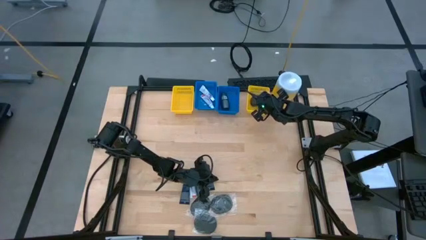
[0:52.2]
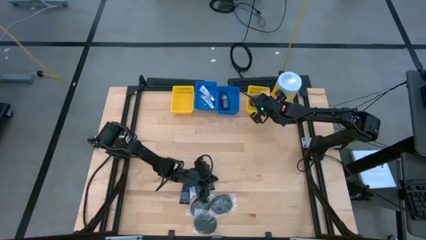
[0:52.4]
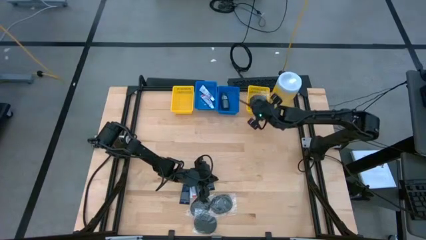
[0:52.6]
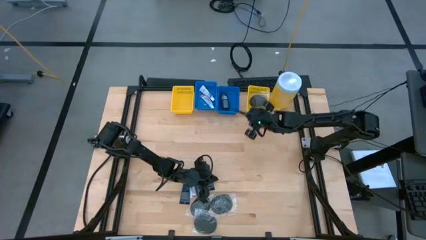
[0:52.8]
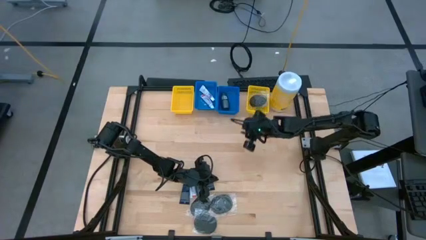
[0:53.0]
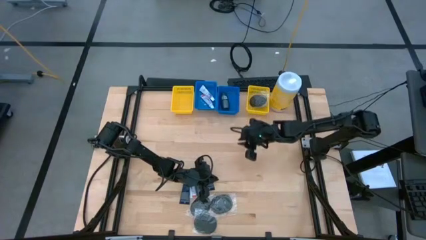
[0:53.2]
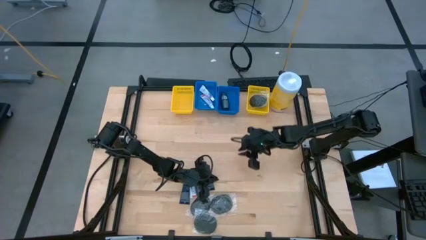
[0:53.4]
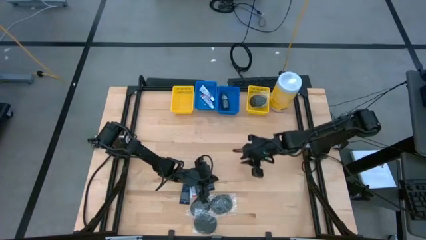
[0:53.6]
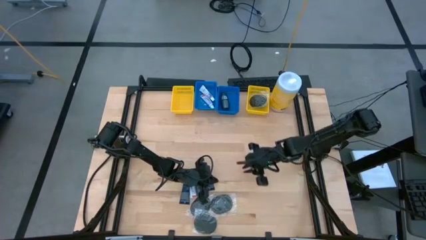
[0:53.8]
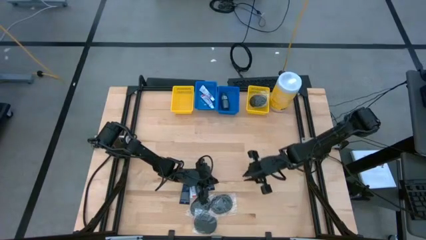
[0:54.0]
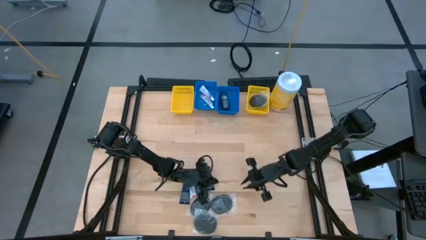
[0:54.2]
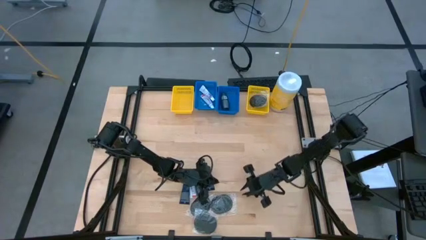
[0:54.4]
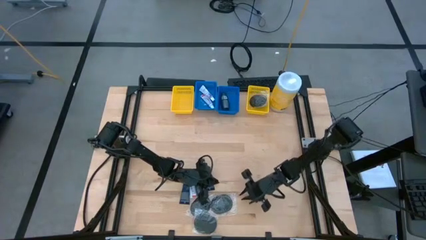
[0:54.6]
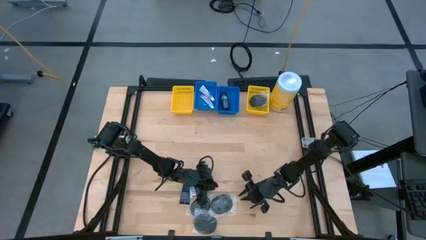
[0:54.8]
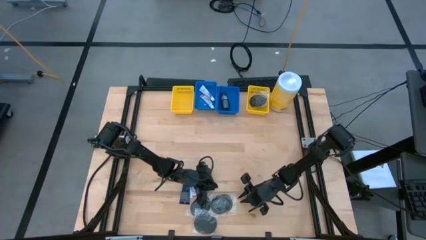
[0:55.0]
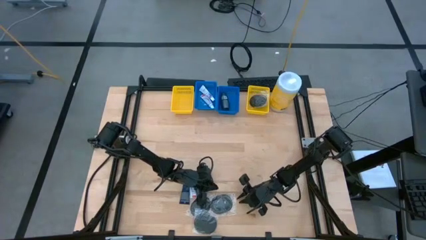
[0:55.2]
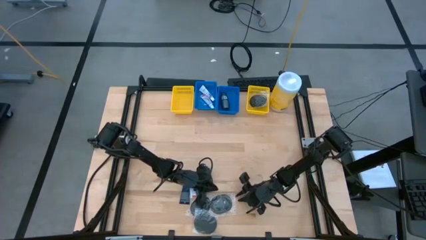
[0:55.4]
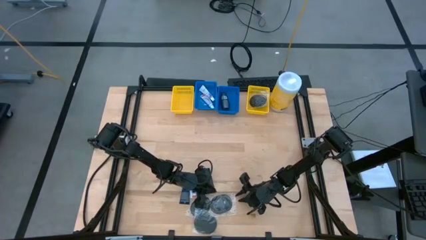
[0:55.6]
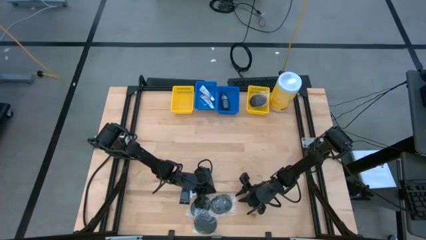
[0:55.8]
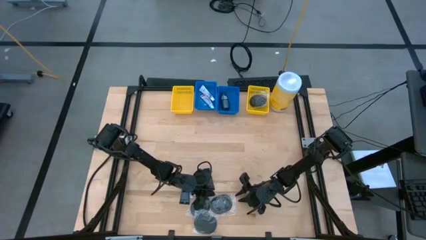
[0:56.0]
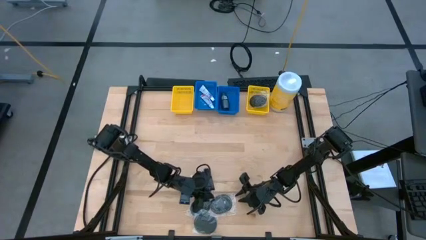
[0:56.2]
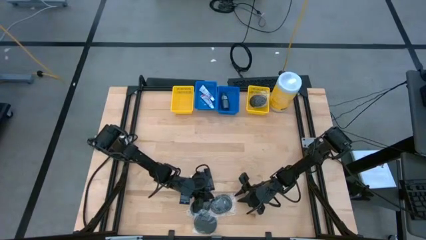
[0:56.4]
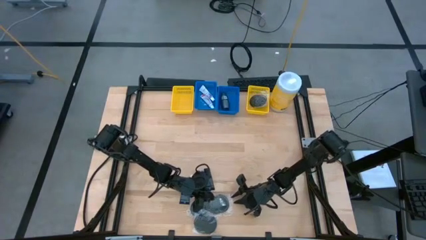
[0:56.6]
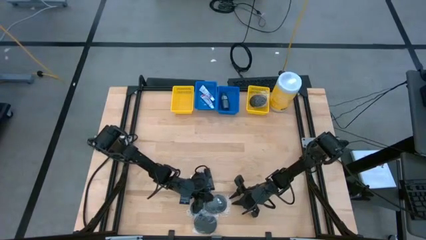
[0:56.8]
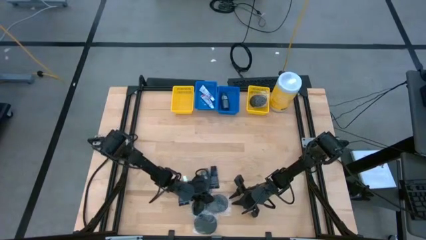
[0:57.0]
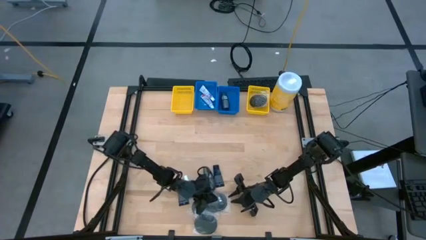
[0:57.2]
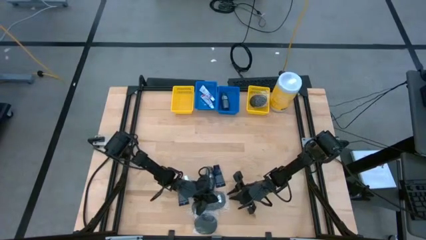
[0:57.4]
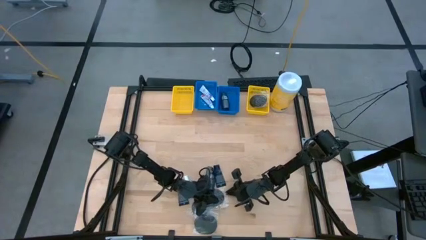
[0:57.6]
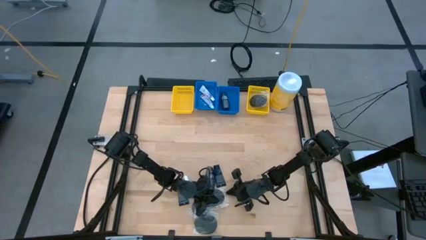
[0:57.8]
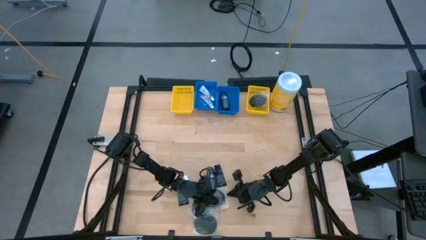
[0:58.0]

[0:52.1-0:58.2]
Task: Pick & Place Travel size toiletries
Put the black hairbrush into the right yellow bin

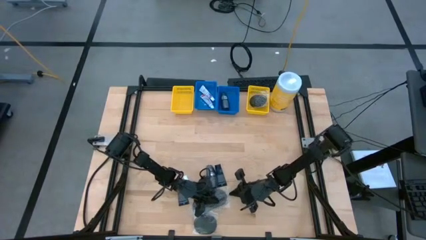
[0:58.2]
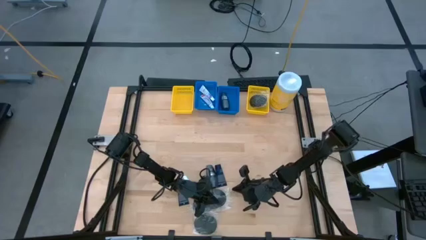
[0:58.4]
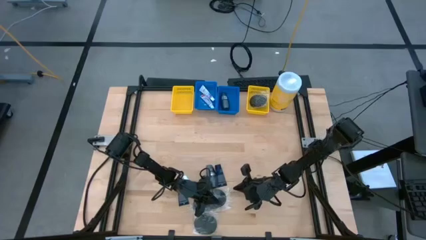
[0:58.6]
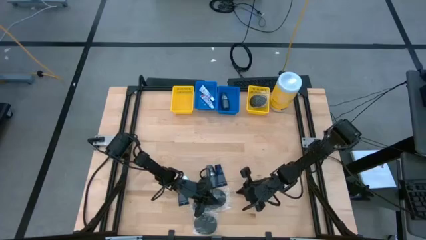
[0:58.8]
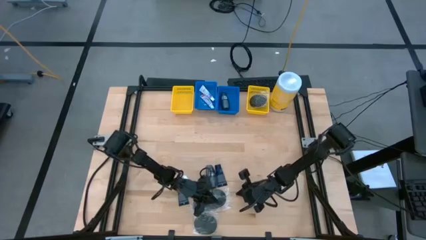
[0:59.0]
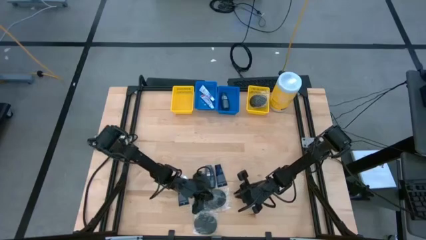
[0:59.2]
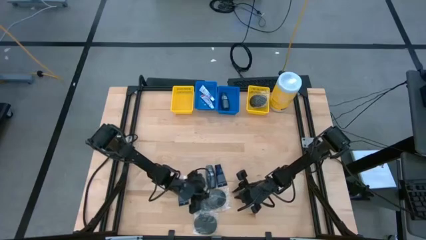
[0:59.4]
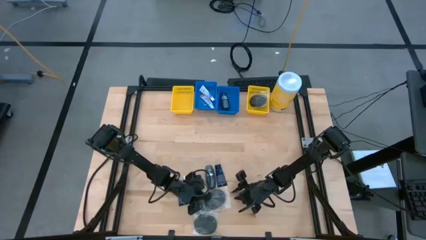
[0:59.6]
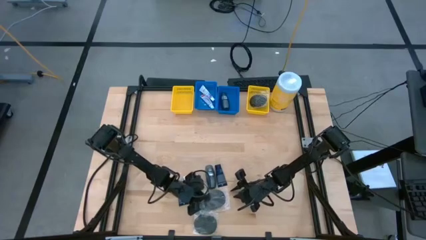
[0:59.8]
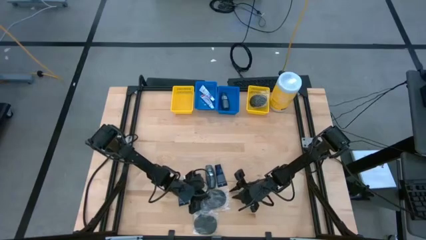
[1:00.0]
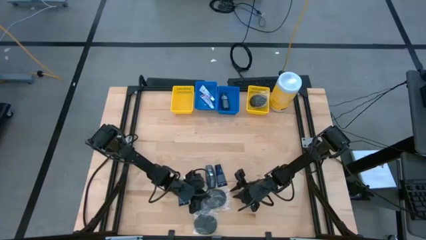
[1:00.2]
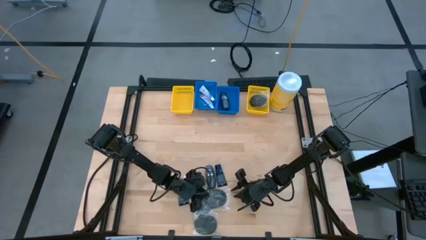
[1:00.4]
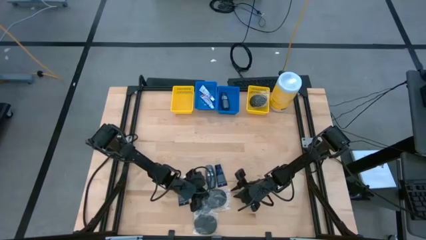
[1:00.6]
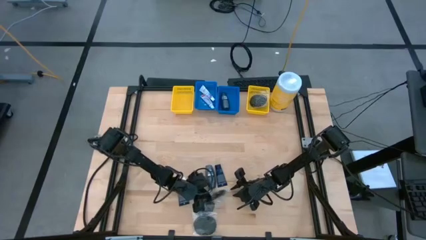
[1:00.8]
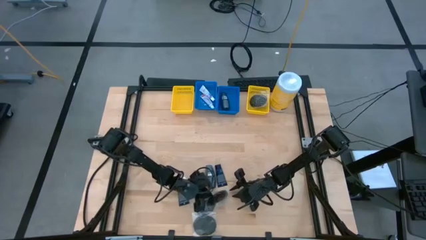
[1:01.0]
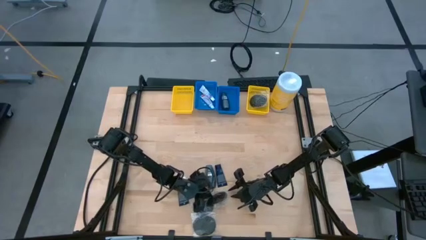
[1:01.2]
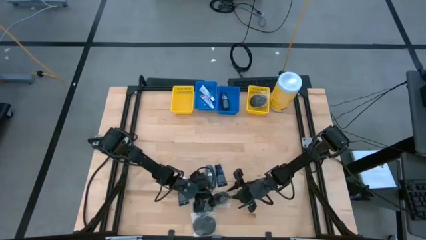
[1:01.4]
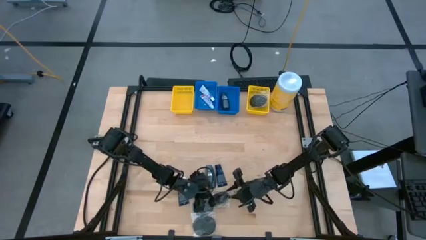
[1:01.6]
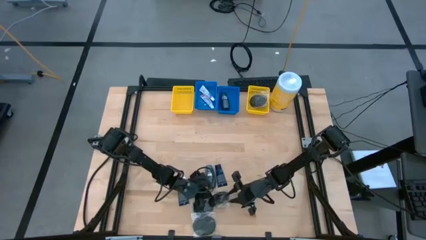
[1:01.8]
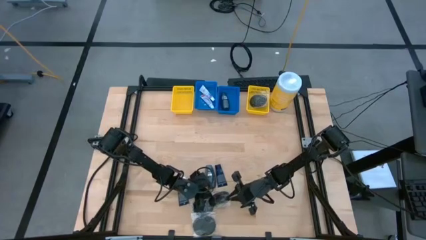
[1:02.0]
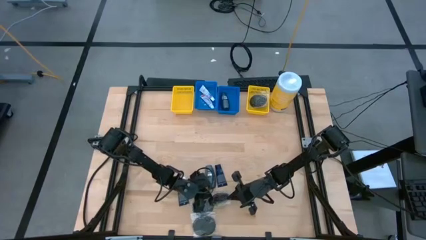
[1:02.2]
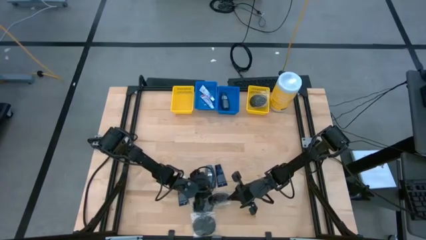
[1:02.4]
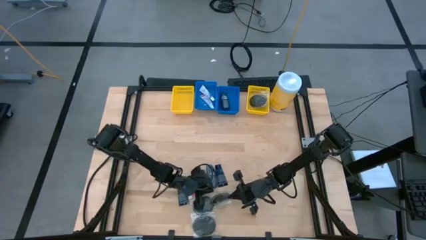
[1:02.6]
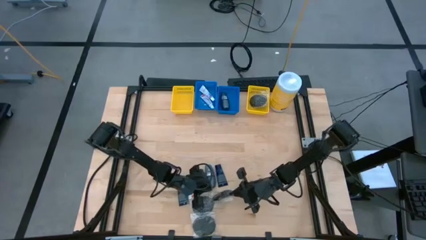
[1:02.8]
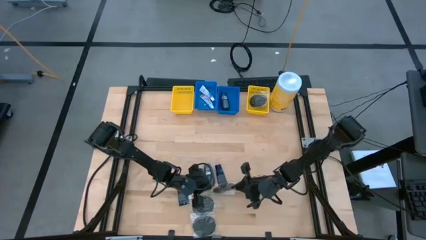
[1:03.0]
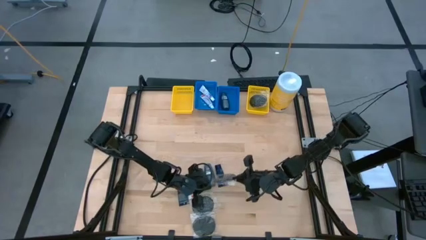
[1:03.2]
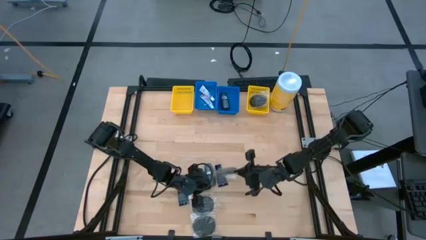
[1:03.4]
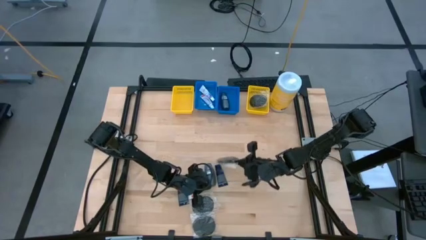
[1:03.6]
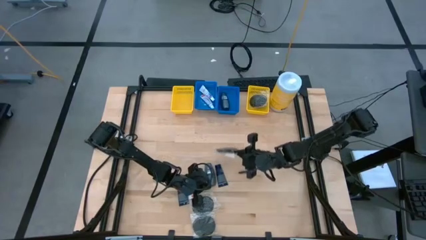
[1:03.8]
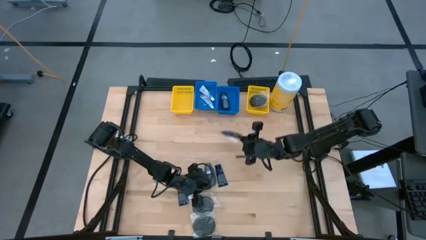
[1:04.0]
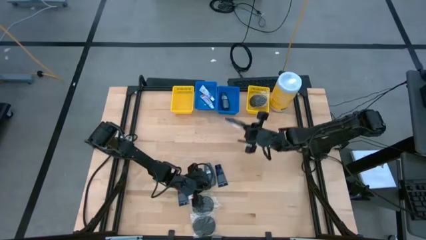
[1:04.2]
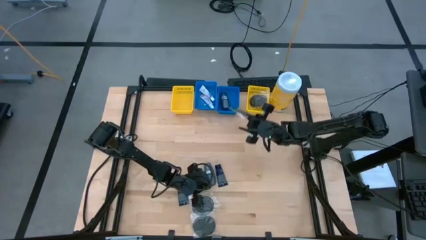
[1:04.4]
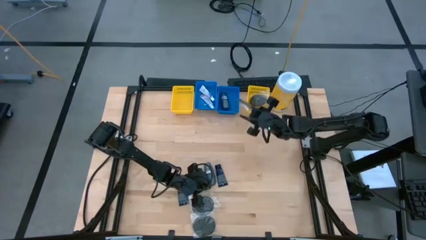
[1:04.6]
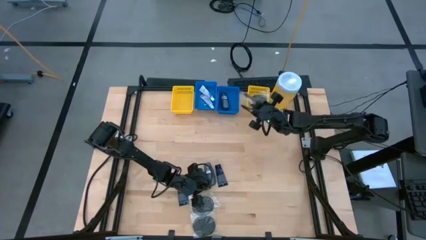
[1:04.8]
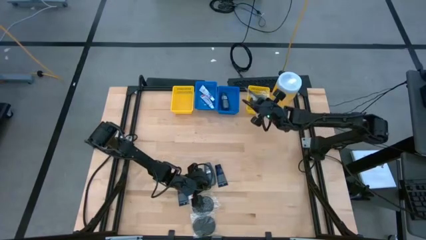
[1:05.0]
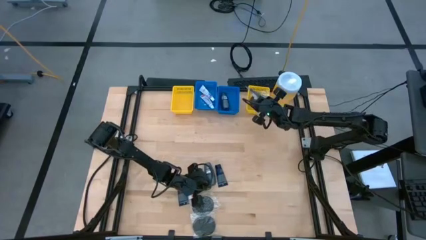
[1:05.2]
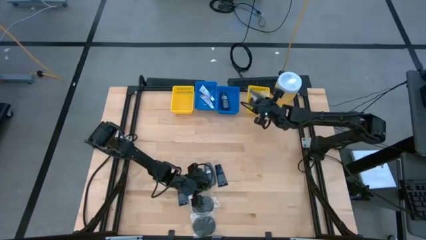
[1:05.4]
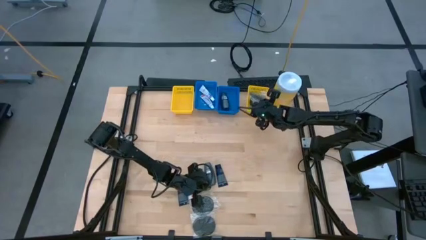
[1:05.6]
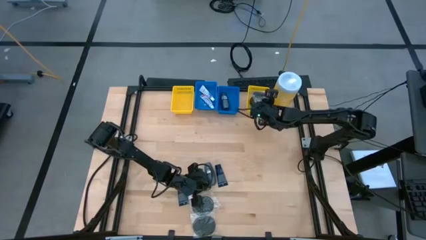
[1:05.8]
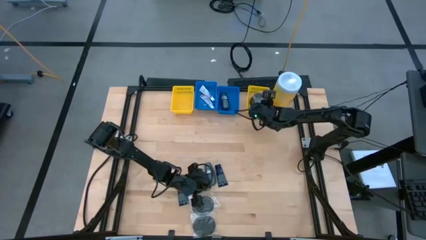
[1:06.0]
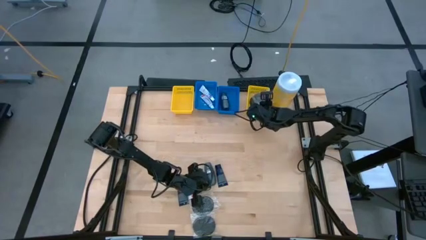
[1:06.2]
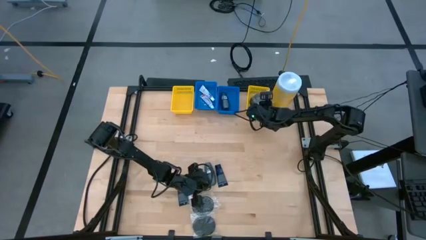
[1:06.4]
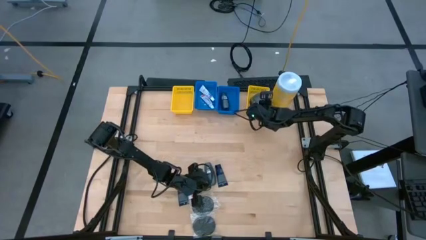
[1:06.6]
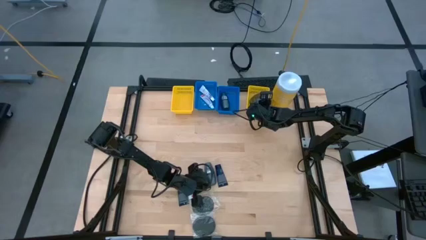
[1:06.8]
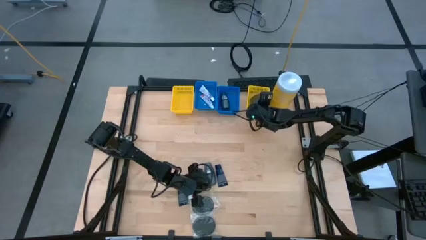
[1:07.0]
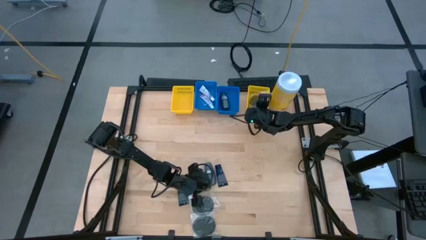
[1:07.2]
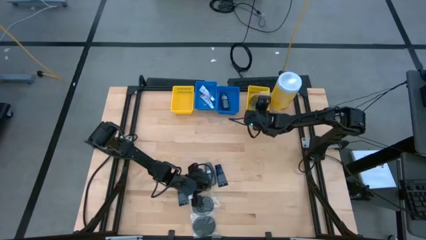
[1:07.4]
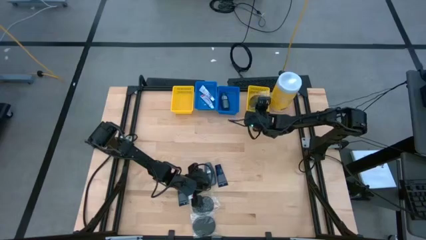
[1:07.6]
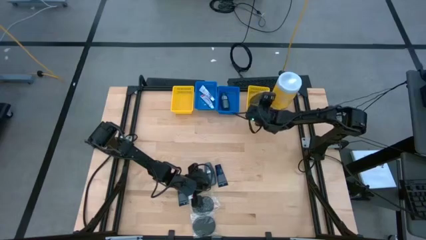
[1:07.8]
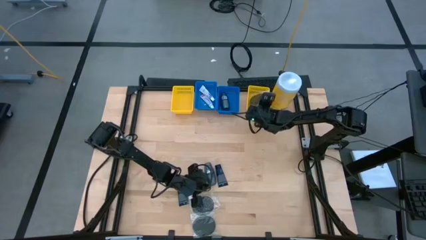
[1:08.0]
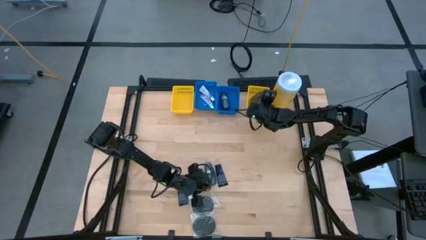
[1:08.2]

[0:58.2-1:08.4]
Put the black hairbrush into the right yellow bin
